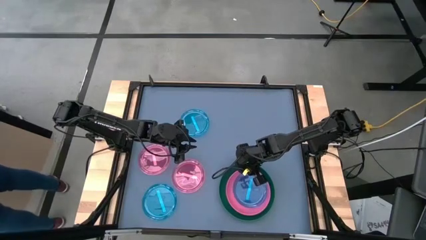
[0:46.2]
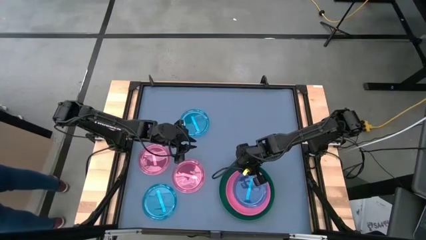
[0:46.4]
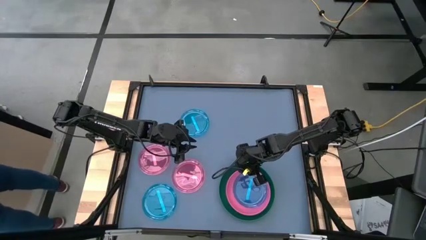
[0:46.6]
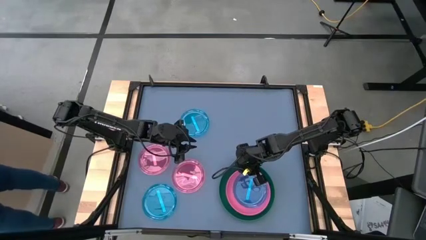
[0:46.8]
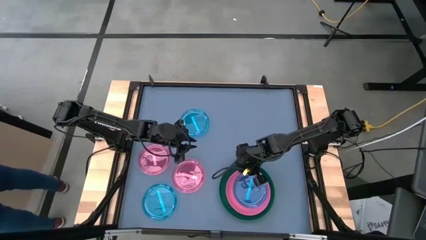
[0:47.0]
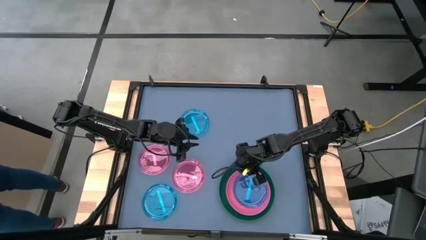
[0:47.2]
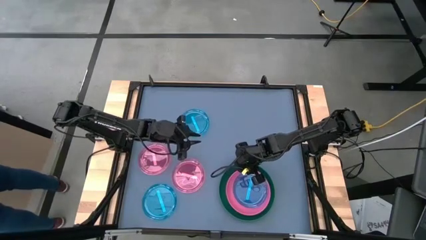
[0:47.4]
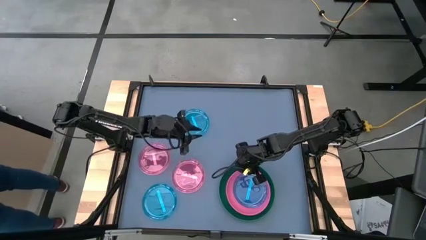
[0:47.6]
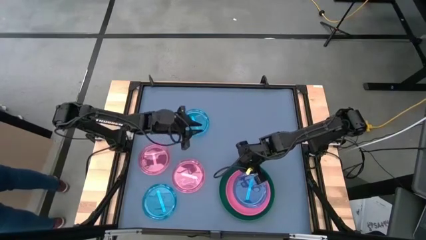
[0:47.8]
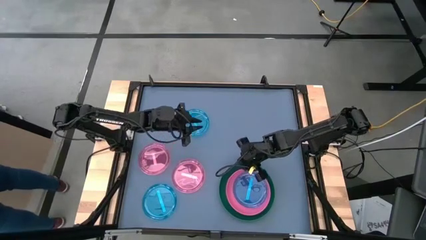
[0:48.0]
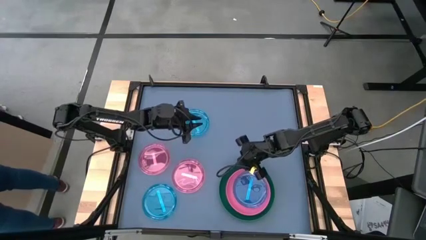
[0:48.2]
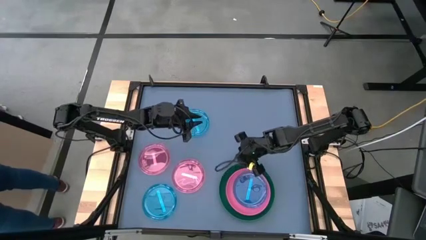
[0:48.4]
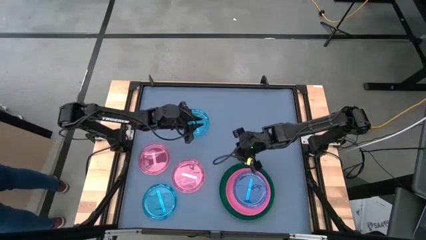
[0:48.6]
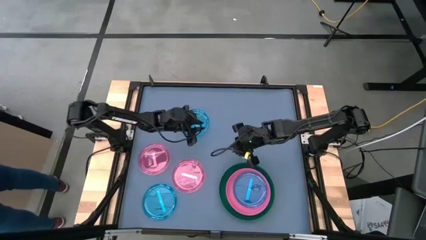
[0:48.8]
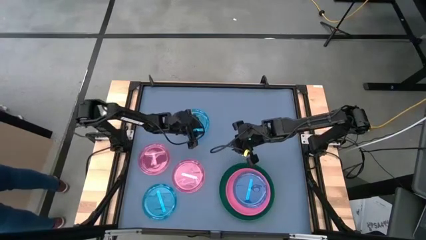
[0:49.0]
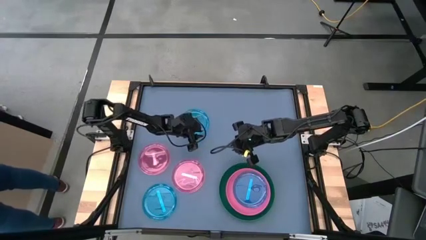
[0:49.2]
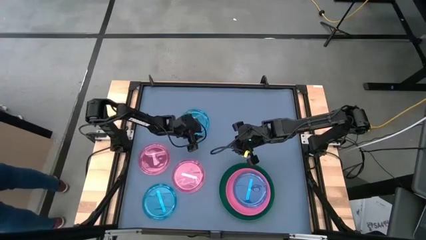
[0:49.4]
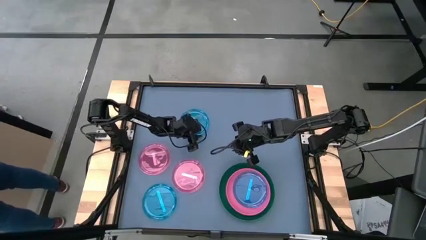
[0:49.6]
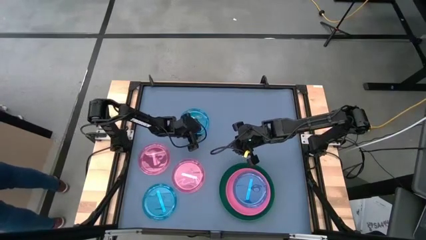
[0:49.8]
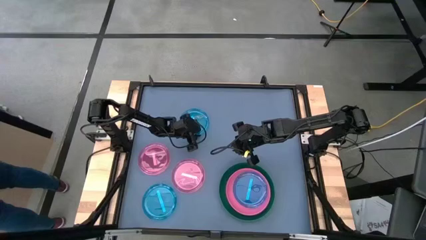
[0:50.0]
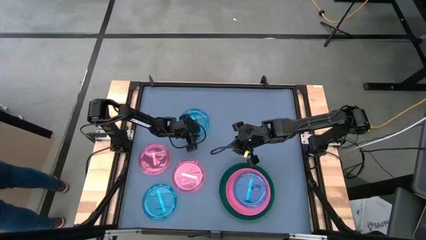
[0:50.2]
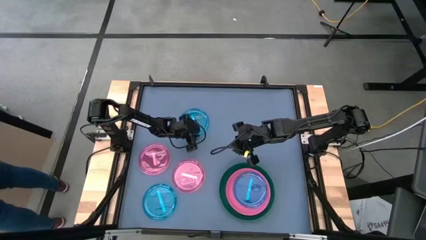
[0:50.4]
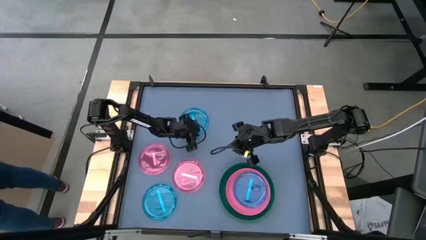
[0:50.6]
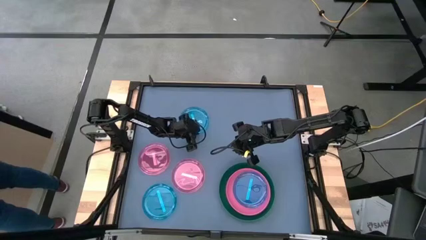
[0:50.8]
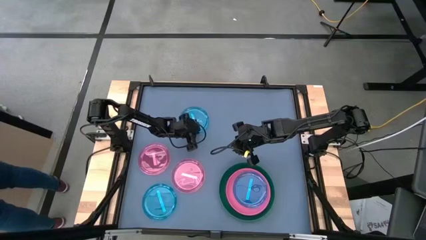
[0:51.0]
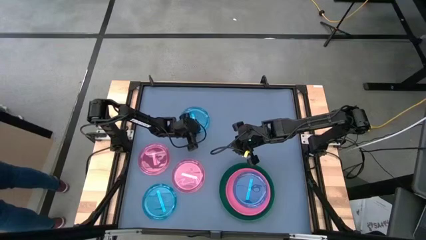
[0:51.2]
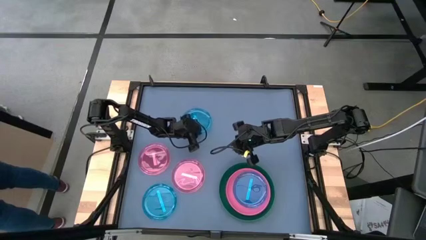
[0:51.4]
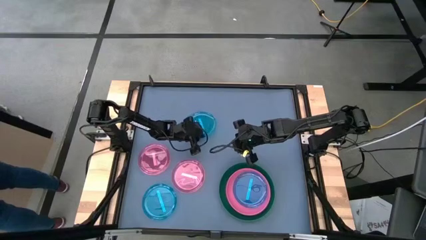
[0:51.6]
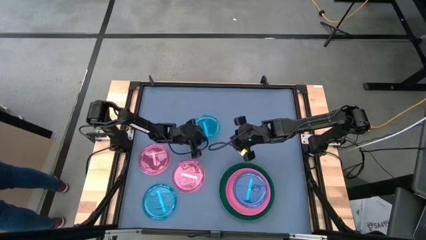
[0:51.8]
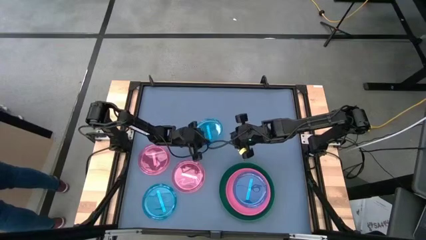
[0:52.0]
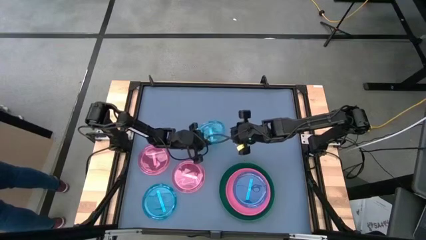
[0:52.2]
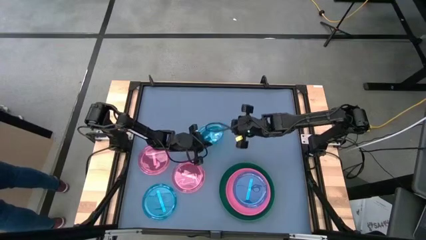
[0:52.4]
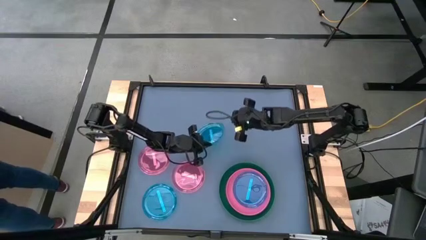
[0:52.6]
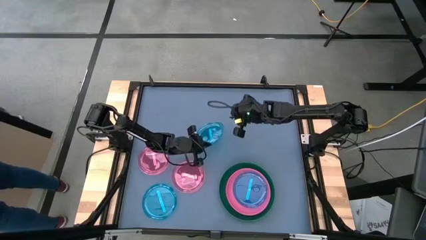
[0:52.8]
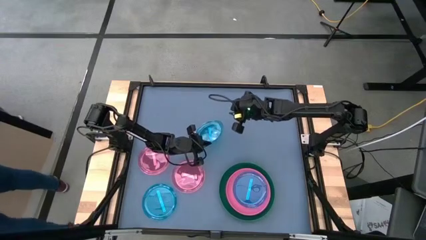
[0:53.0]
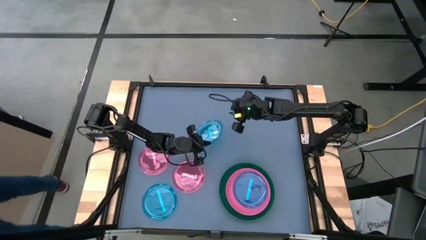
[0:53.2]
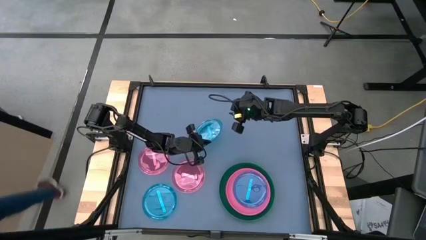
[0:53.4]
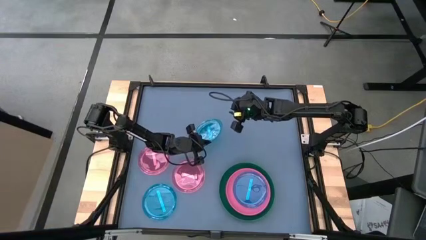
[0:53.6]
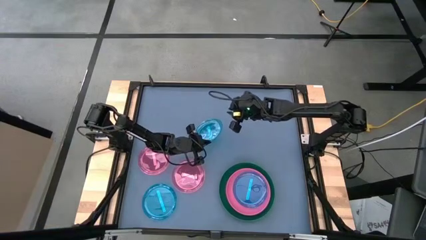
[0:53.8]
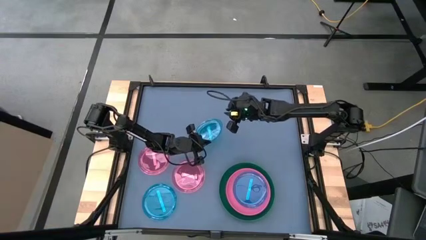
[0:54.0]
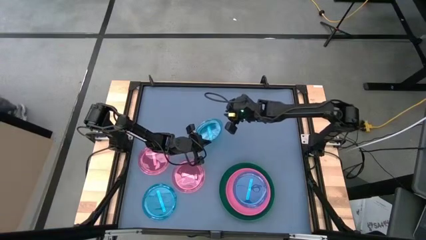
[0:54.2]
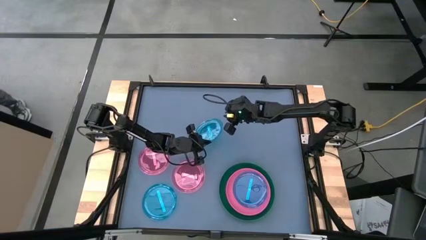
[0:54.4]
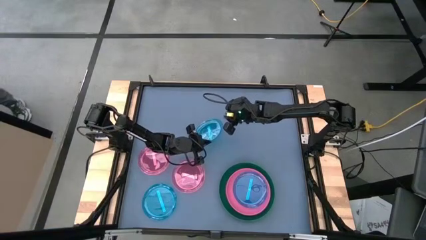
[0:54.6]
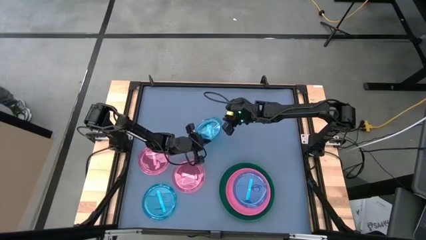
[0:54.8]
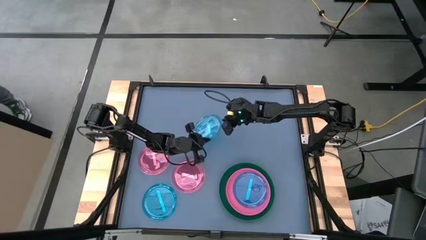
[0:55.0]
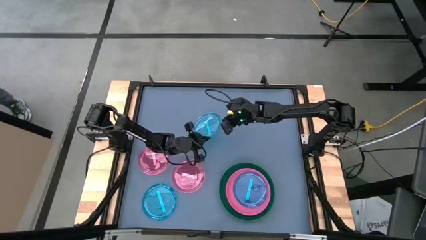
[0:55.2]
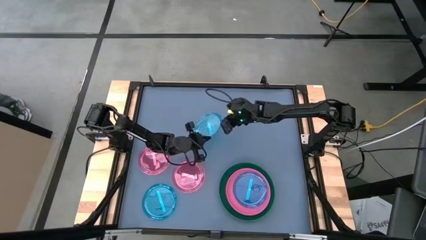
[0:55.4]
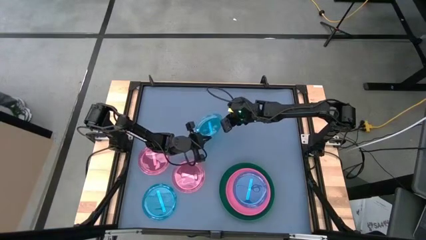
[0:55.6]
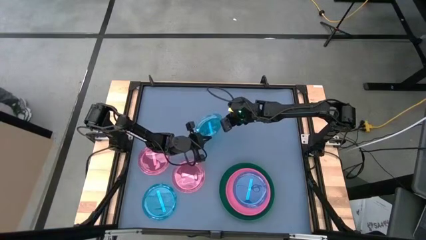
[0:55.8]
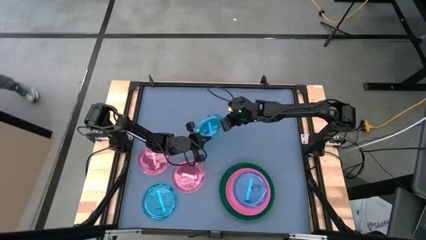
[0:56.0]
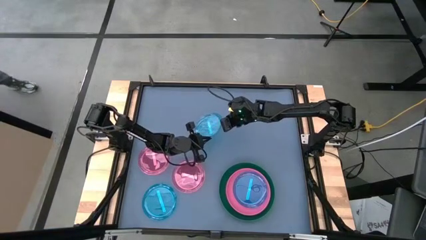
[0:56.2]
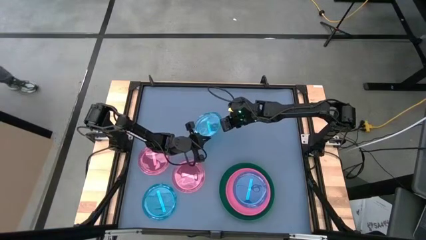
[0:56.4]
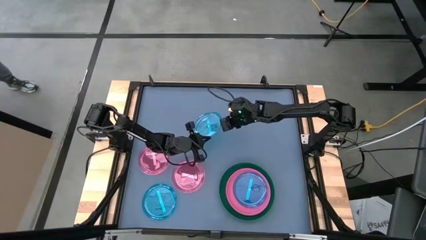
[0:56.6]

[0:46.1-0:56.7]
Task: Stack plastic plates
Stack the top blue plate on top of the blue plate

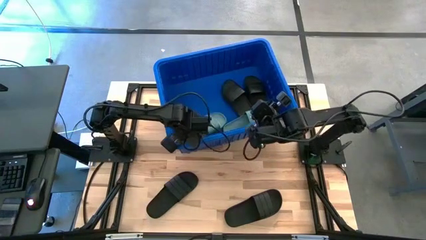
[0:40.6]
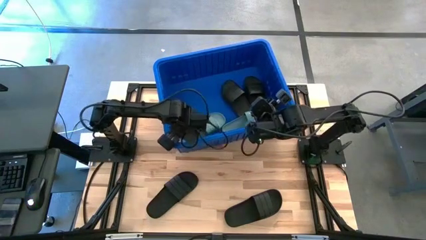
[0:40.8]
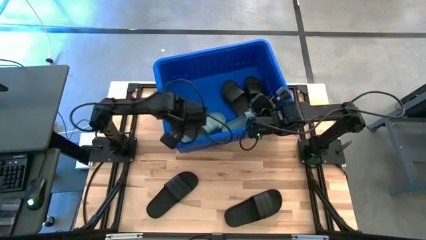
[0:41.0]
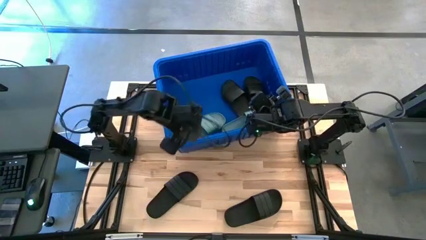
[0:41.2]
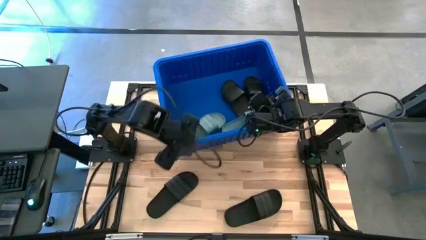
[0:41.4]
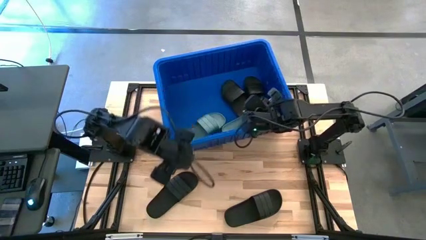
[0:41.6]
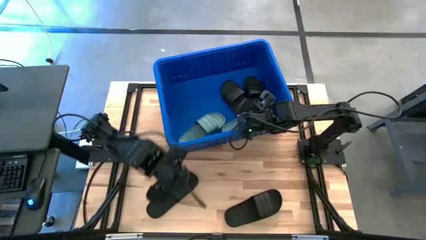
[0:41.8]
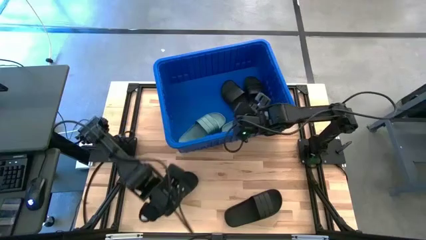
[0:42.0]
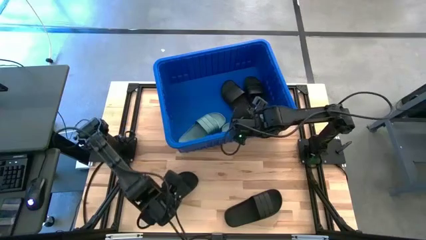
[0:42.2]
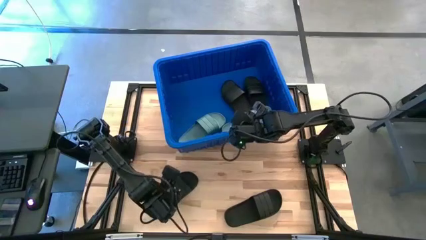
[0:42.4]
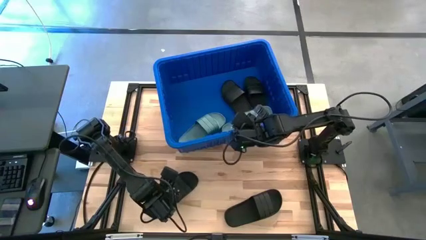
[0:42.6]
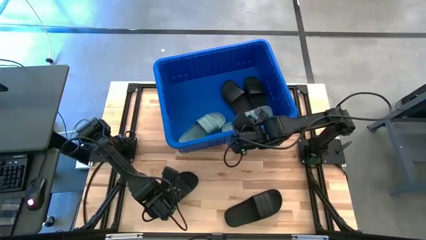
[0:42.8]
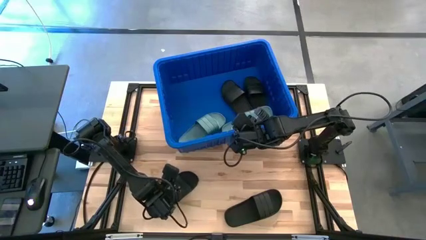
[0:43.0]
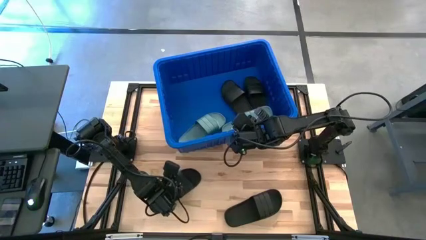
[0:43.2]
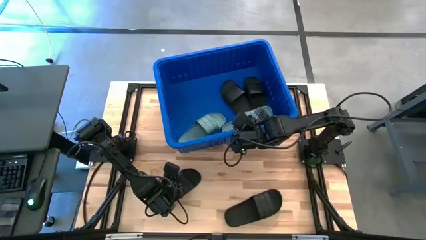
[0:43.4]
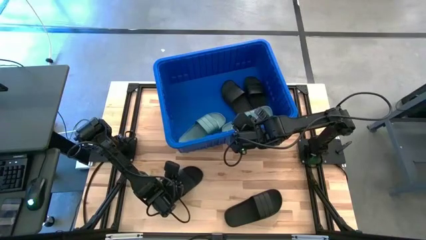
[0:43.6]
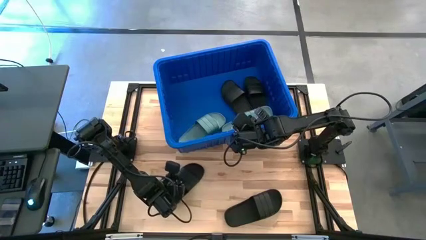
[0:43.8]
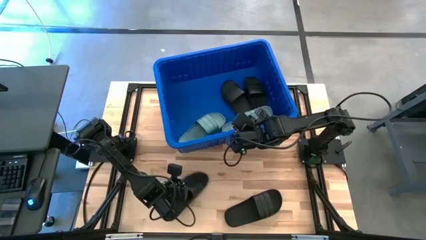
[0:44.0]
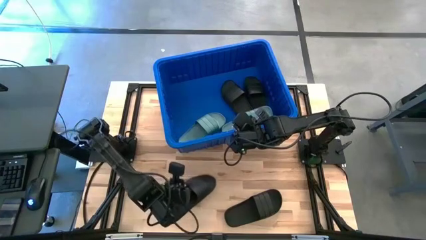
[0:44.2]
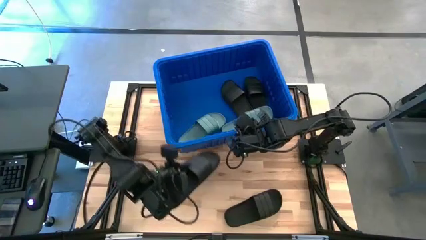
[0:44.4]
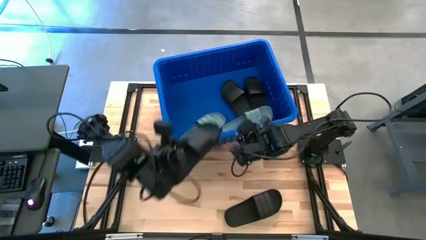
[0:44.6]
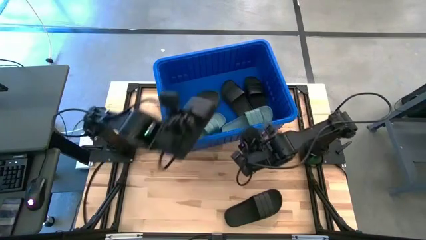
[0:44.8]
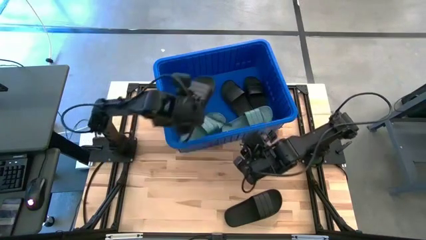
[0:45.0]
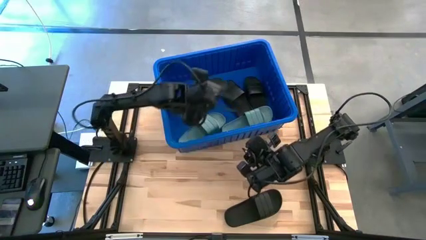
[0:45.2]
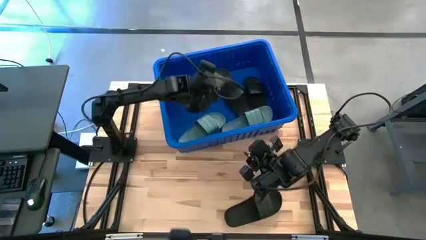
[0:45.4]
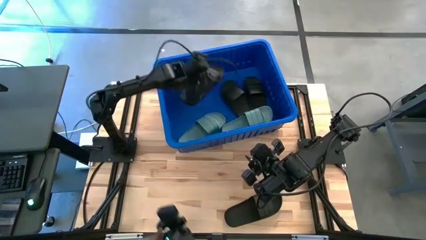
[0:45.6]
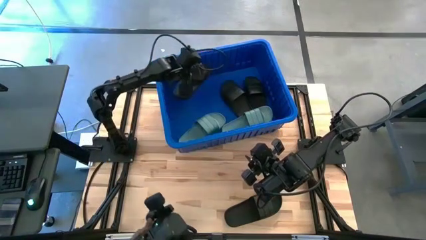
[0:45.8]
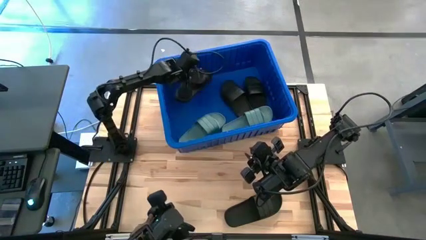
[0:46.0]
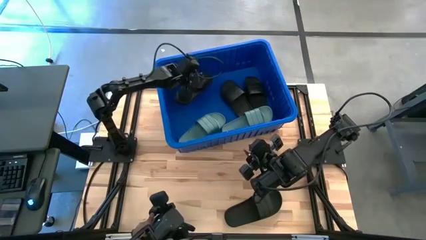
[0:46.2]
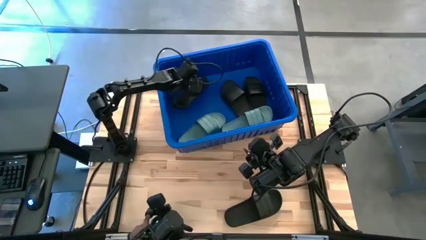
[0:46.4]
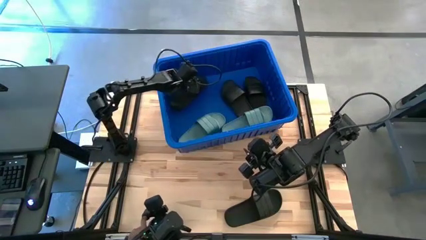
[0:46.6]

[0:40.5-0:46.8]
Task: Pick and place slides into bin
Put the black slide into the blue bin
